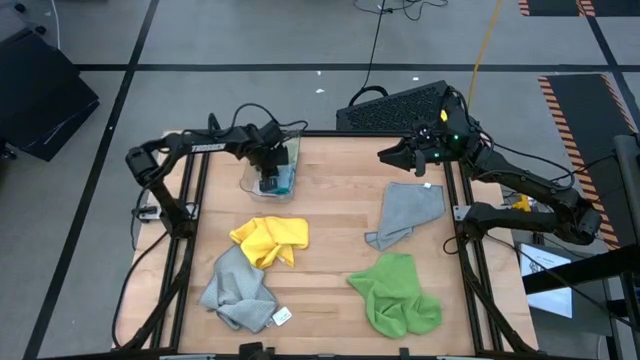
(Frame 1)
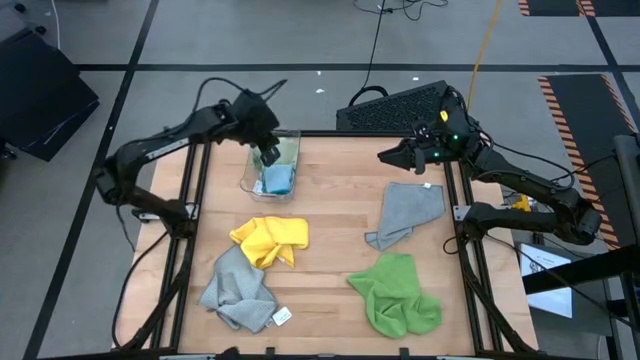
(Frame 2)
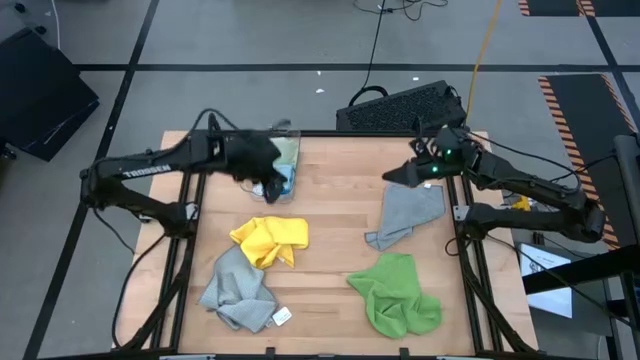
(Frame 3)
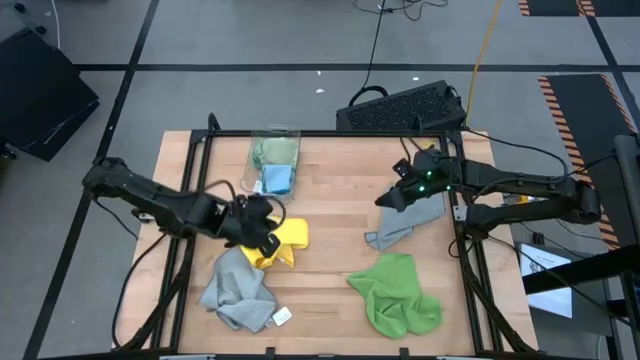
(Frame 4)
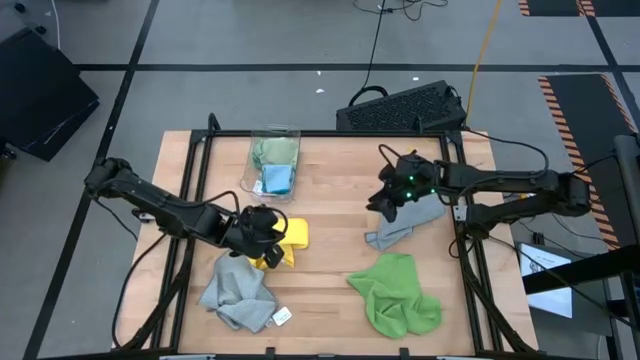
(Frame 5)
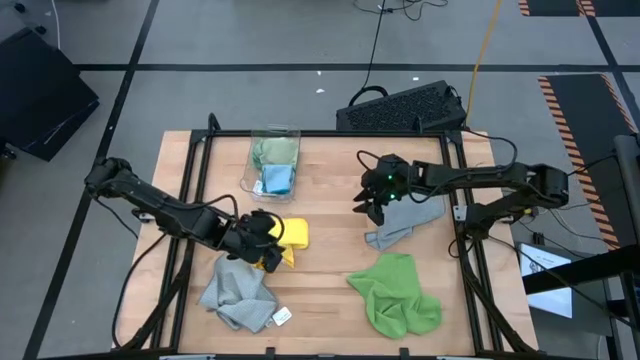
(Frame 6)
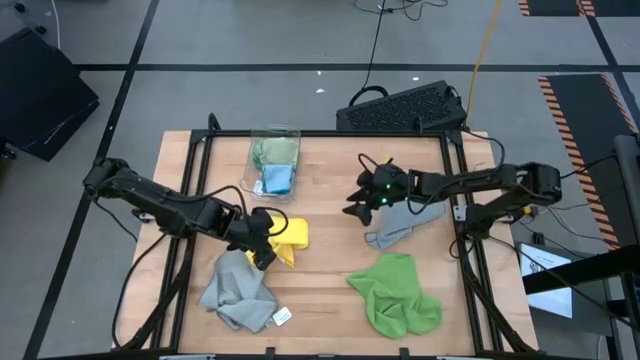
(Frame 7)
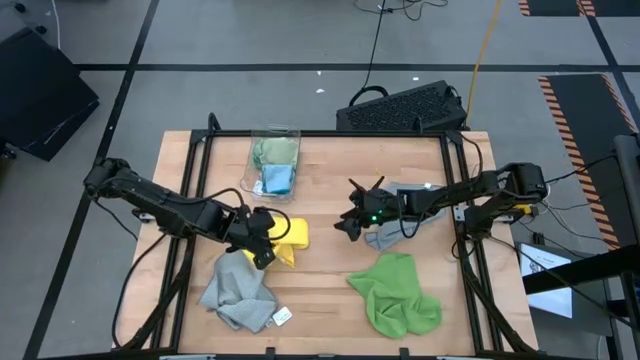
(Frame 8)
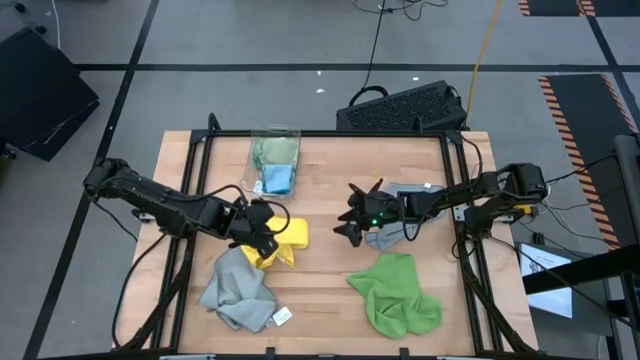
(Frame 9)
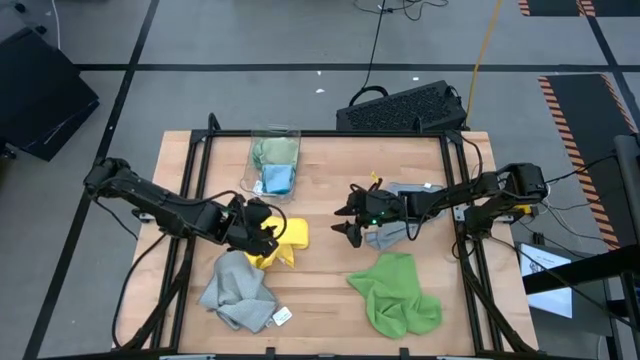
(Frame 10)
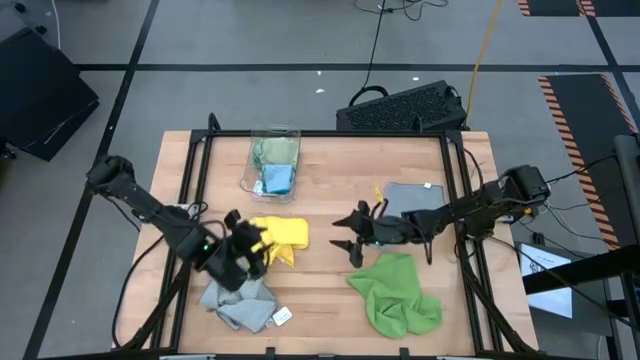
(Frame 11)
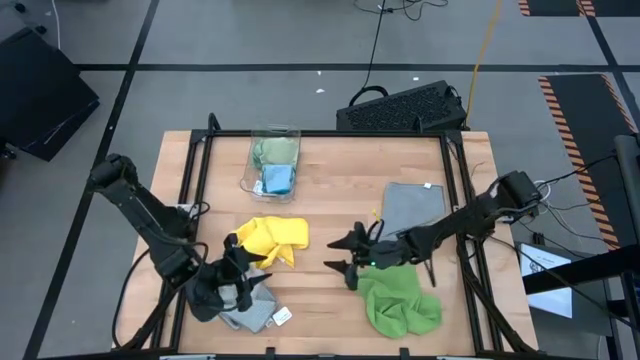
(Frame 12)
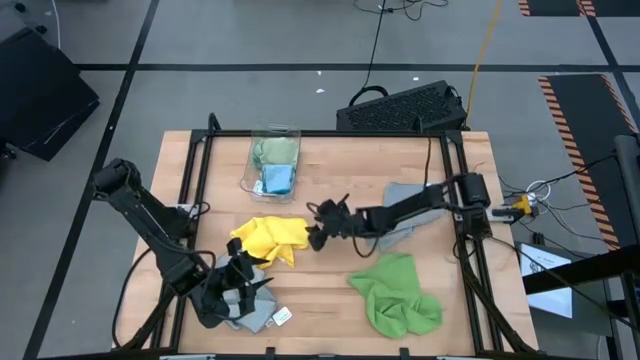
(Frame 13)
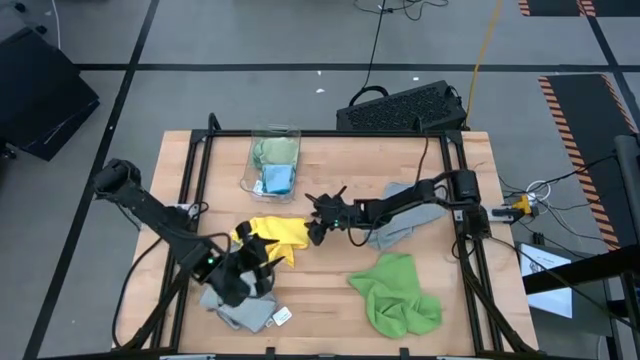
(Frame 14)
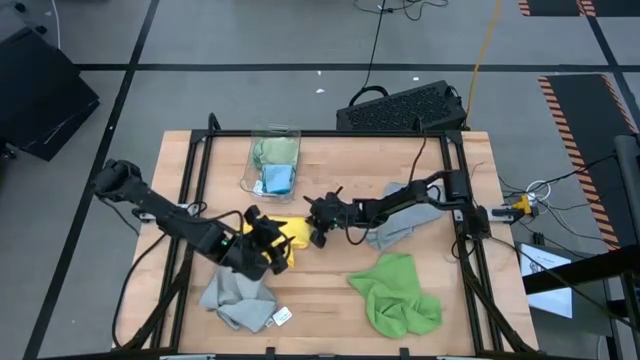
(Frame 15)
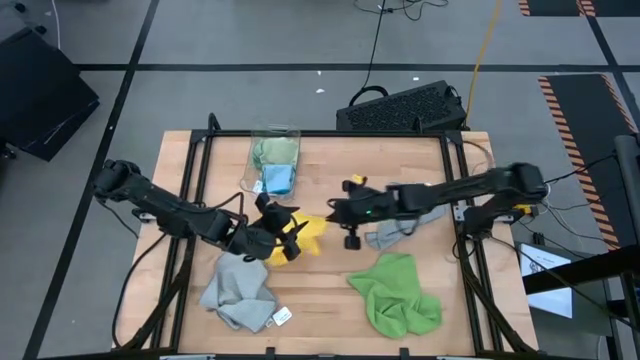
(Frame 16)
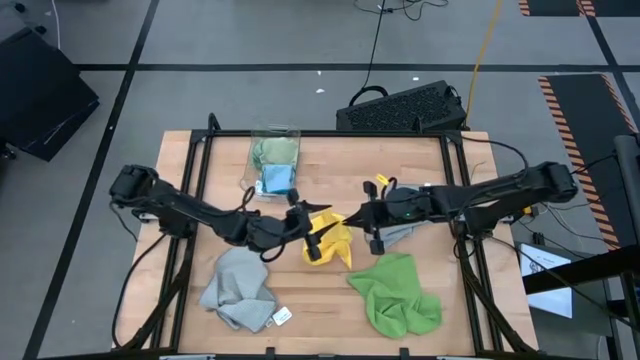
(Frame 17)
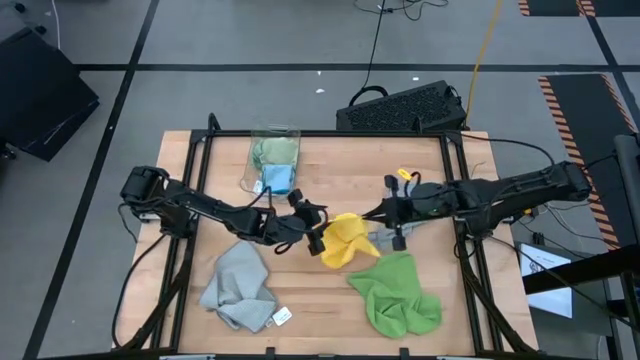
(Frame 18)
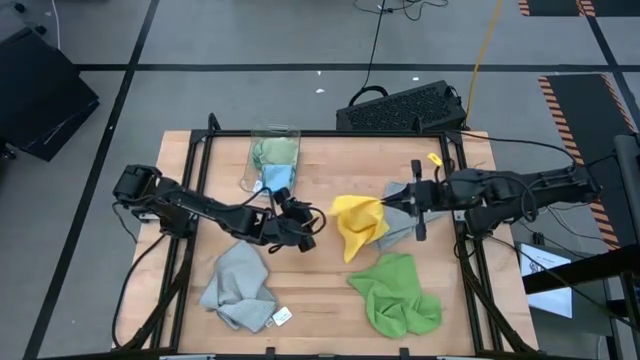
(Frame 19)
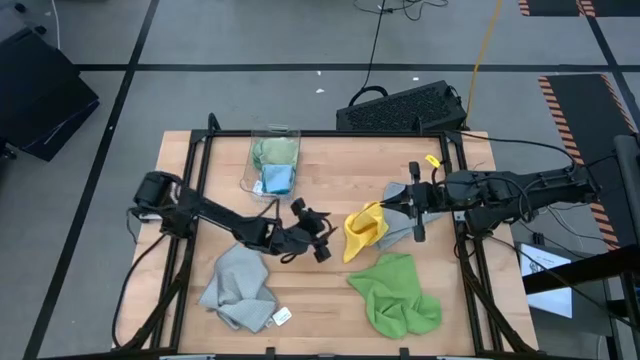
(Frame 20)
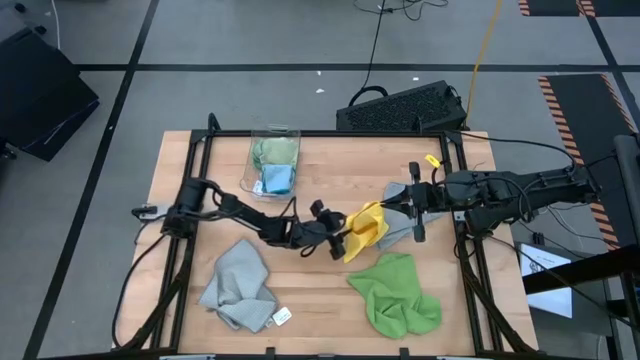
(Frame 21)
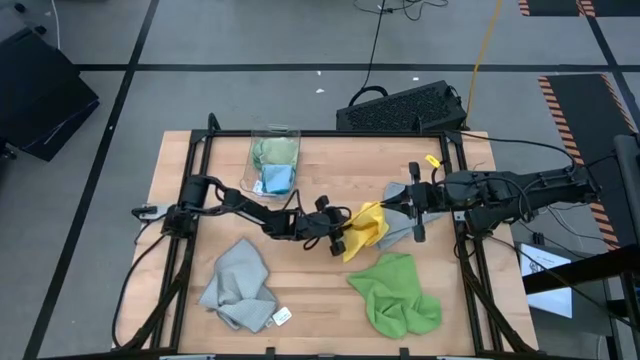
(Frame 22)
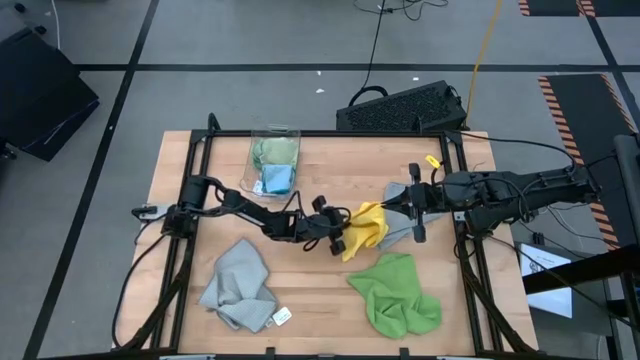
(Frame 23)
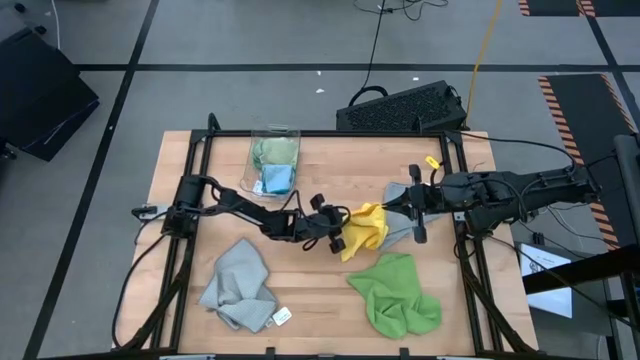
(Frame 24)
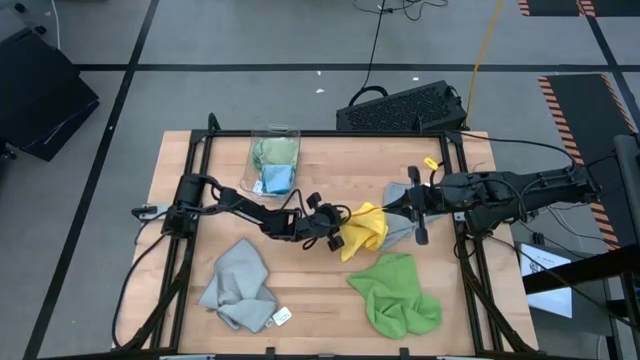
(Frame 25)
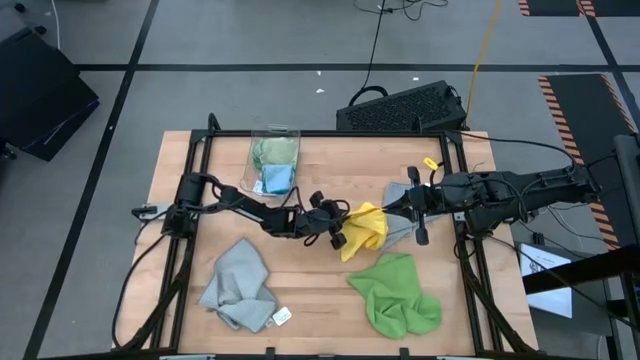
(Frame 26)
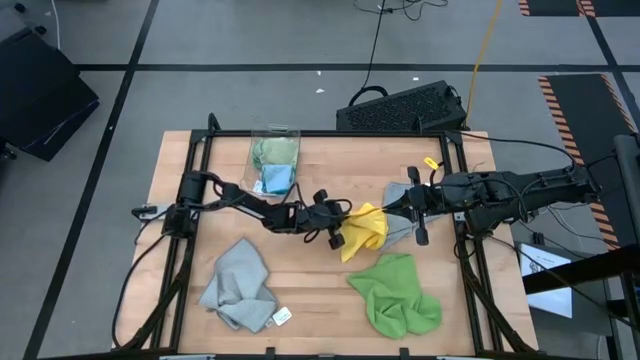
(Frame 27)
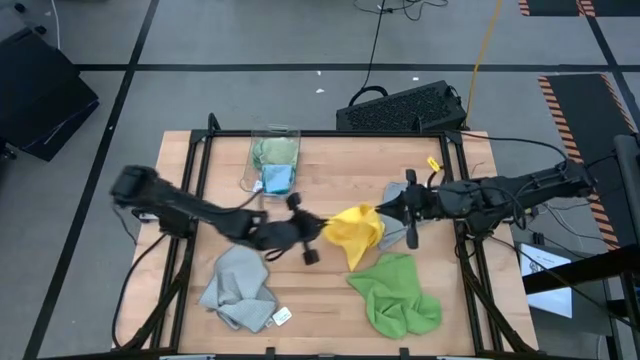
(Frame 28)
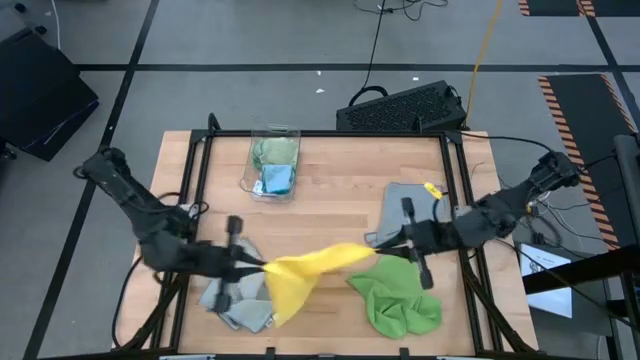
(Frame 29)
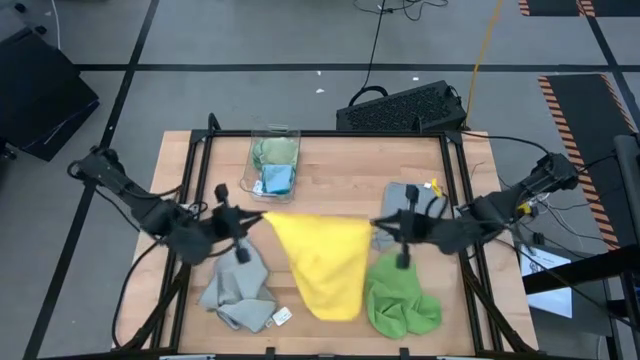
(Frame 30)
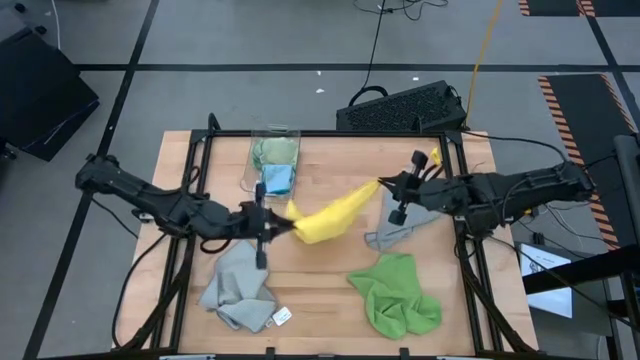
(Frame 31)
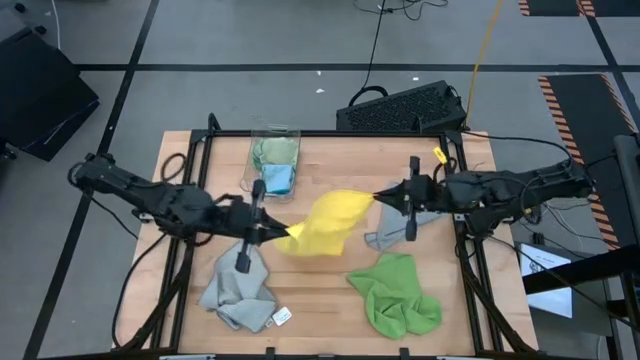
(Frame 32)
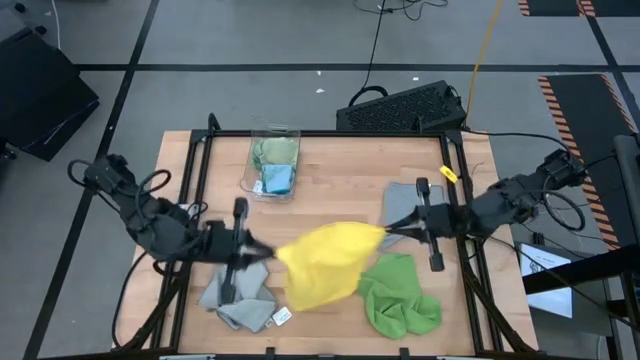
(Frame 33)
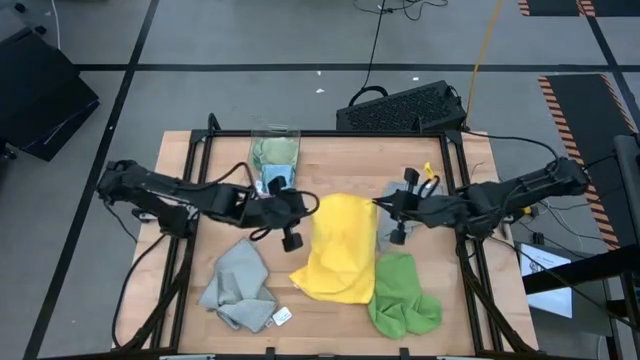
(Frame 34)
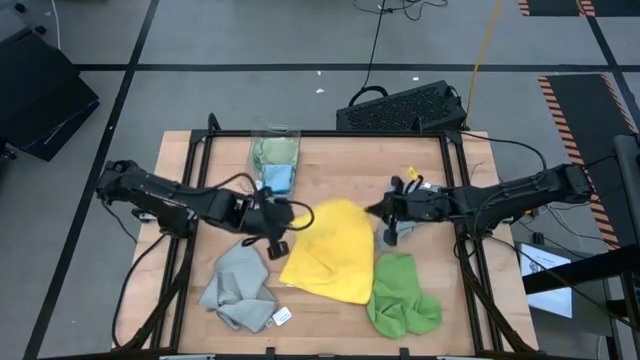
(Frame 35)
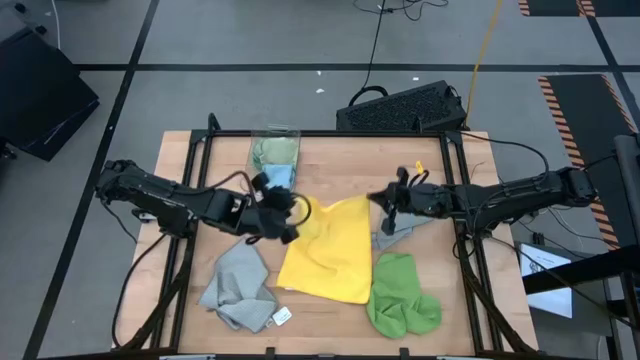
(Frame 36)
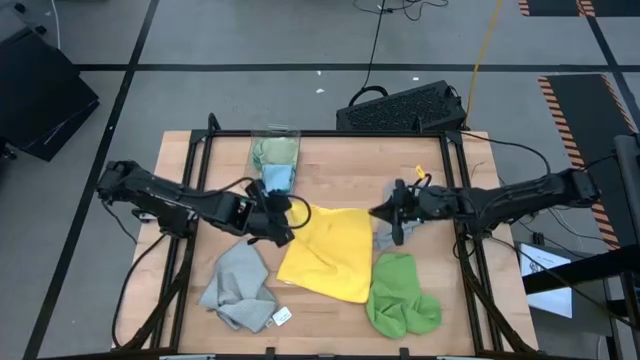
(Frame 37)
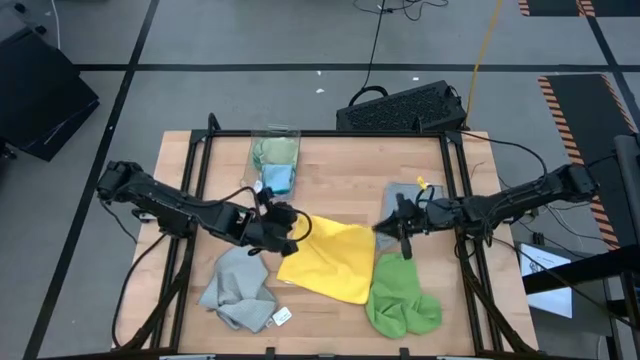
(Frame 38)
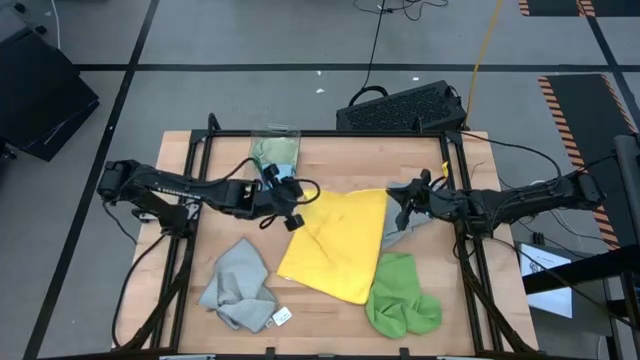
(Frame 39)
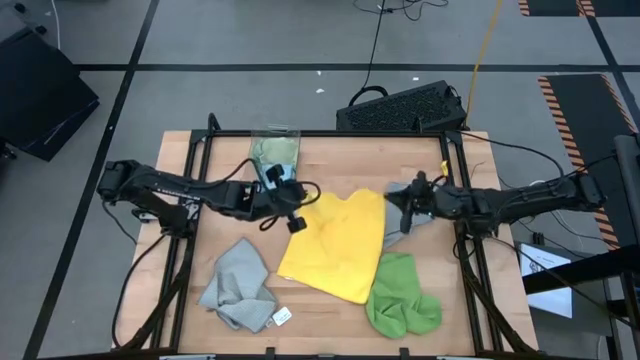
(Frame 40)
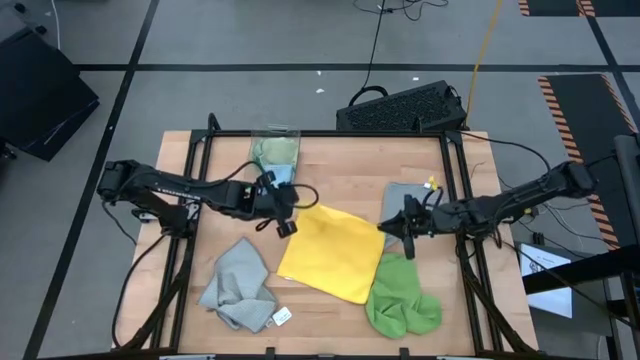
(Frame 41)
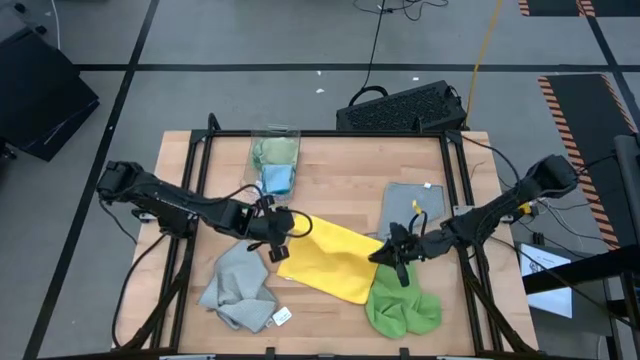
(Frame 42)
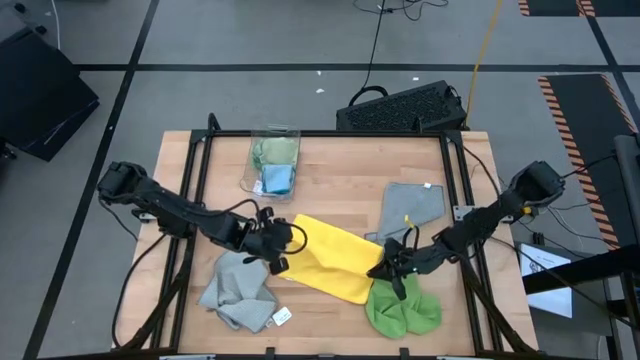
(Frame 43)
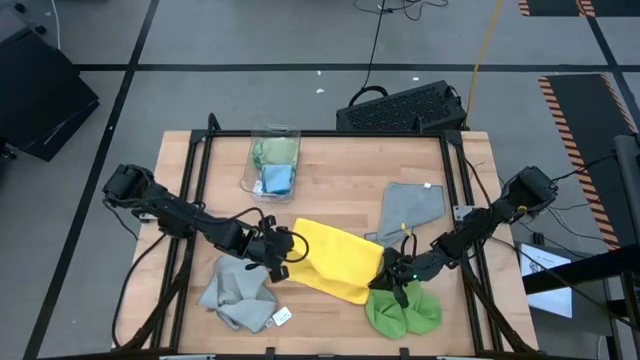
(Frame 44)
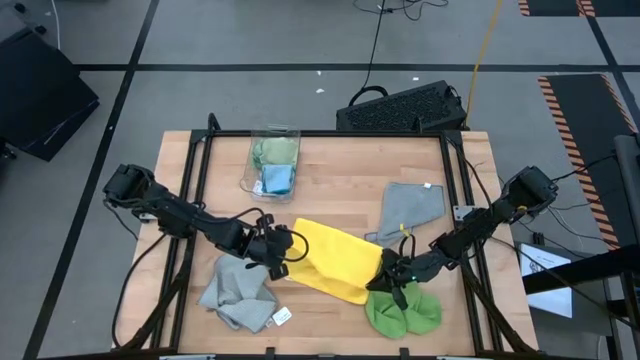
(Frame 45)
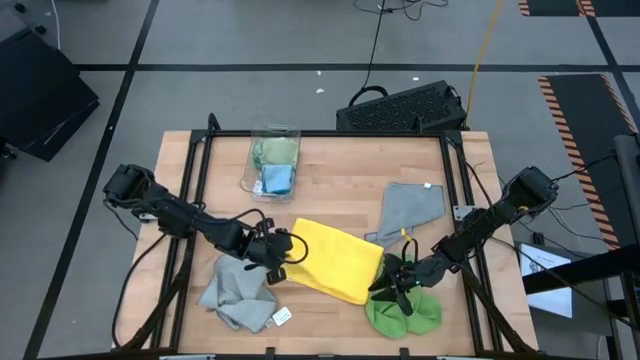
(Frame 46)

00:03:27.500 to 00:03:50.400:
Task: Fold microfiber towels
Fold the yellow microfiber cloth
